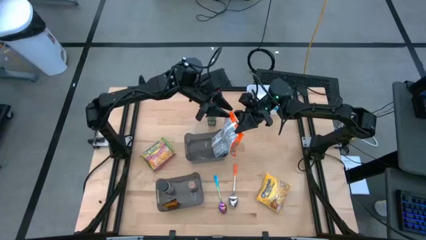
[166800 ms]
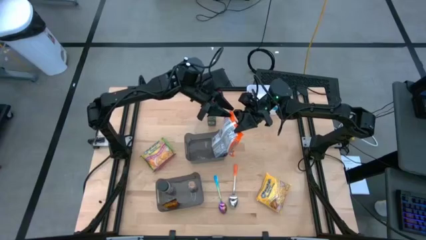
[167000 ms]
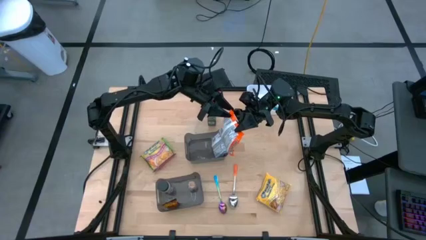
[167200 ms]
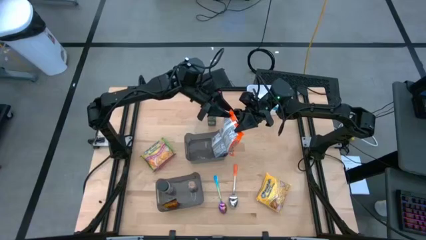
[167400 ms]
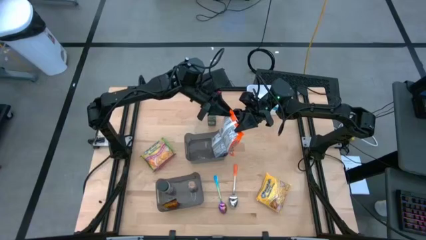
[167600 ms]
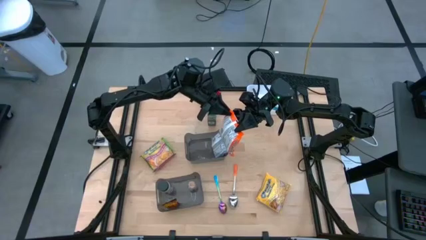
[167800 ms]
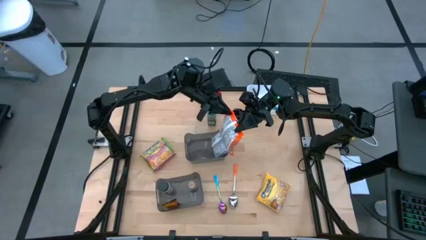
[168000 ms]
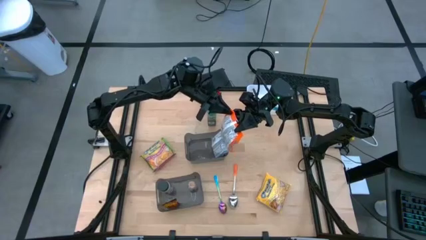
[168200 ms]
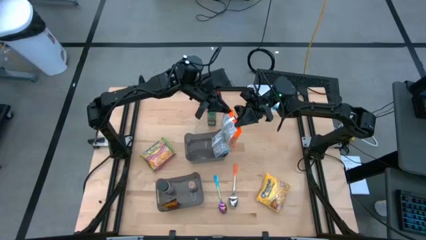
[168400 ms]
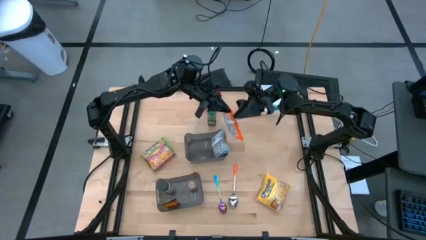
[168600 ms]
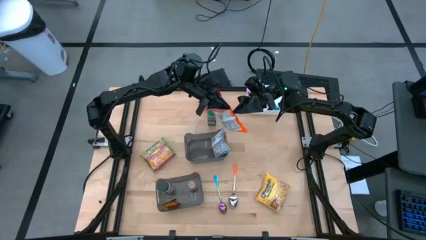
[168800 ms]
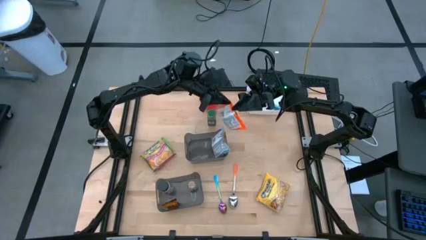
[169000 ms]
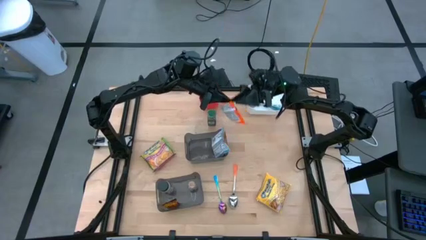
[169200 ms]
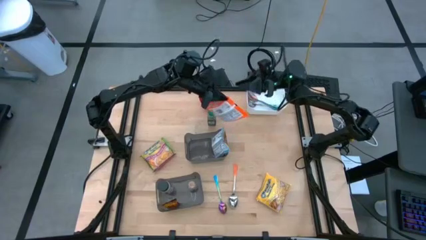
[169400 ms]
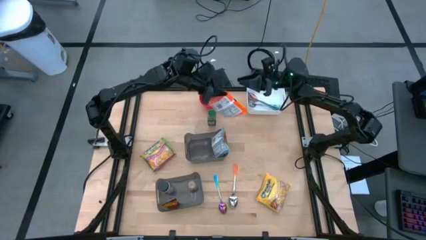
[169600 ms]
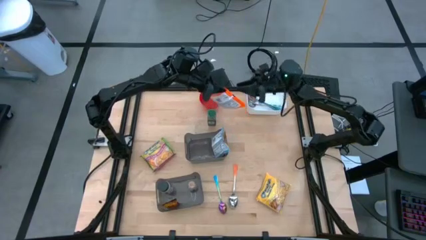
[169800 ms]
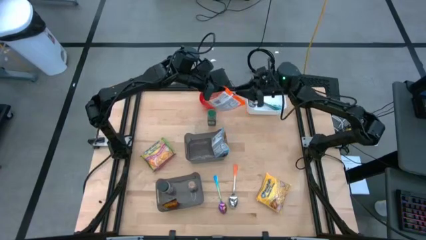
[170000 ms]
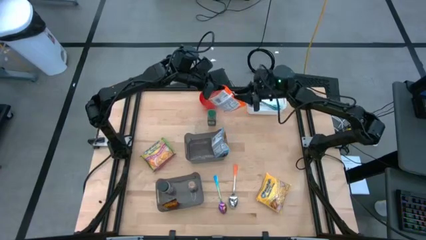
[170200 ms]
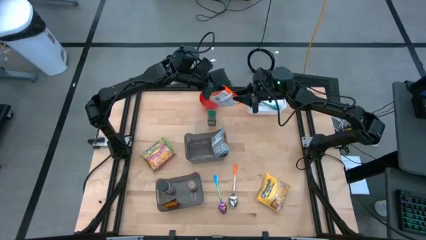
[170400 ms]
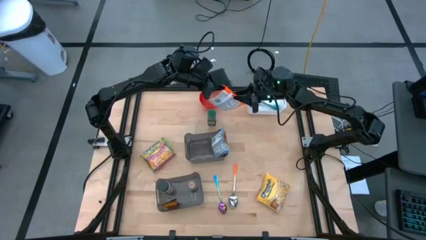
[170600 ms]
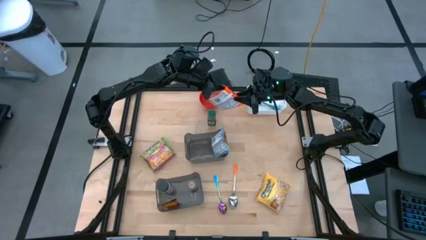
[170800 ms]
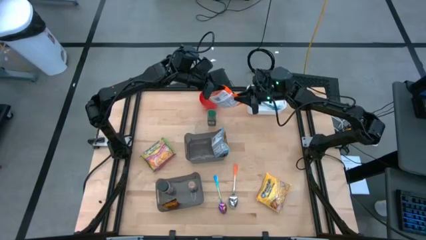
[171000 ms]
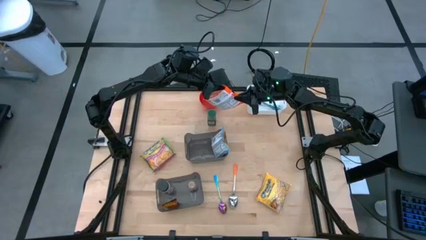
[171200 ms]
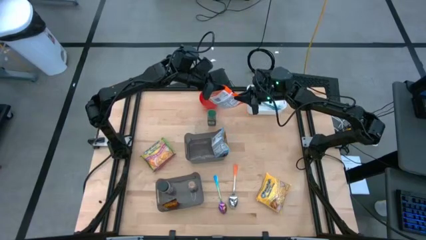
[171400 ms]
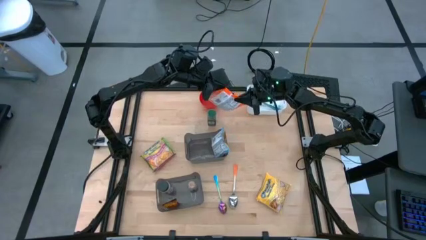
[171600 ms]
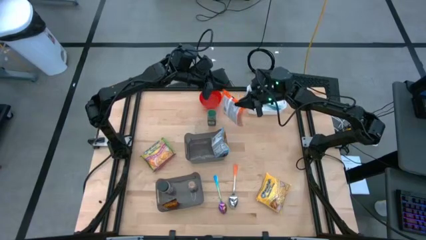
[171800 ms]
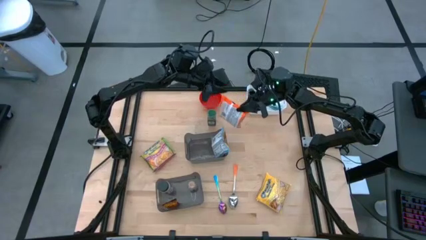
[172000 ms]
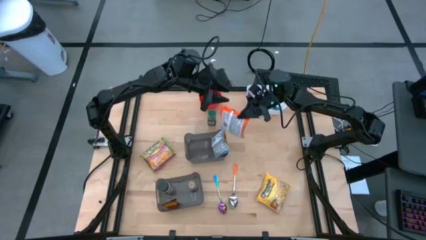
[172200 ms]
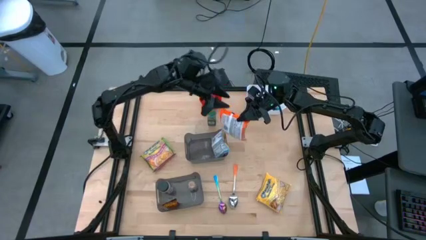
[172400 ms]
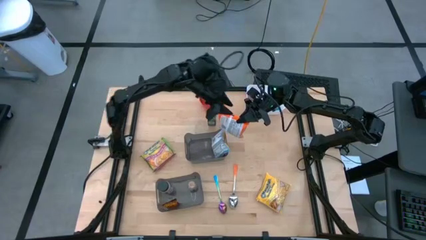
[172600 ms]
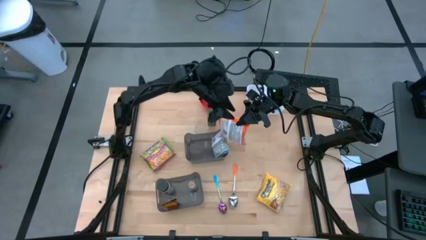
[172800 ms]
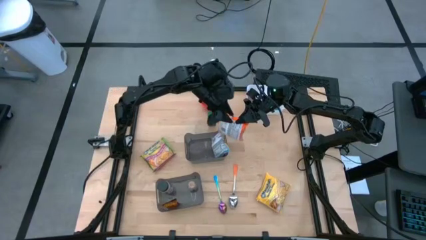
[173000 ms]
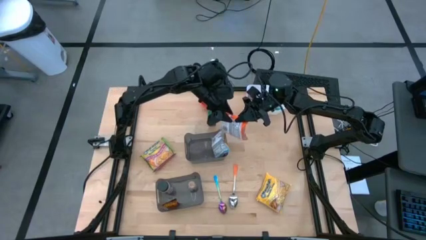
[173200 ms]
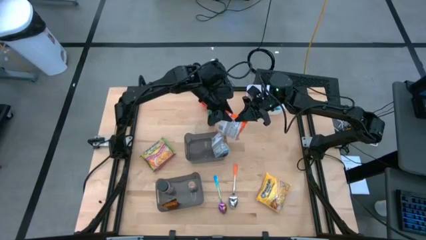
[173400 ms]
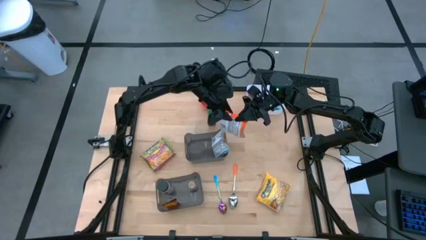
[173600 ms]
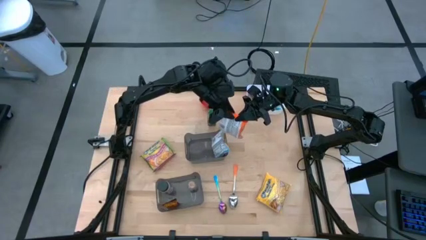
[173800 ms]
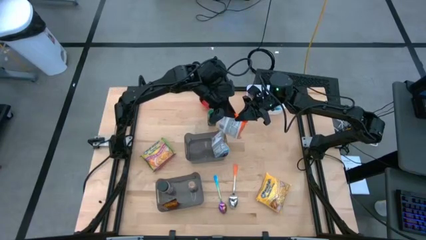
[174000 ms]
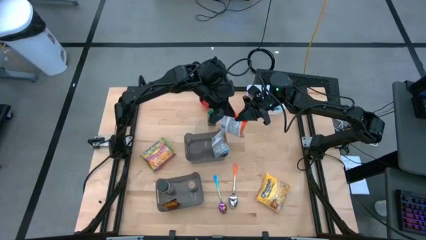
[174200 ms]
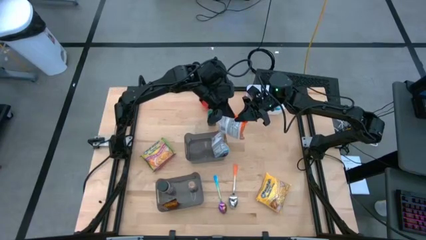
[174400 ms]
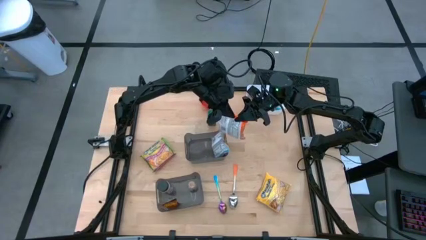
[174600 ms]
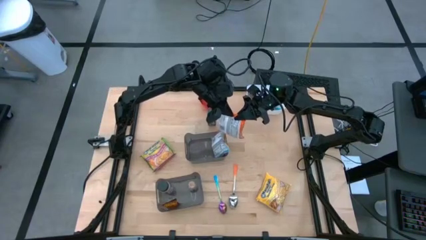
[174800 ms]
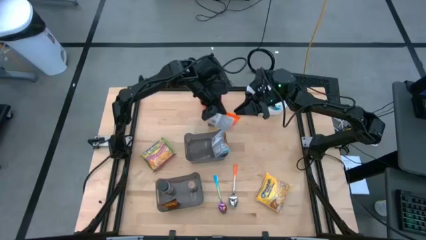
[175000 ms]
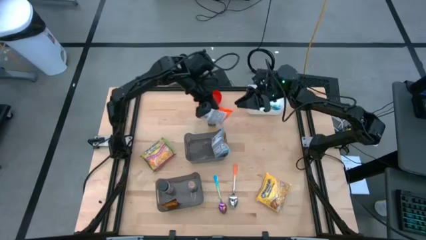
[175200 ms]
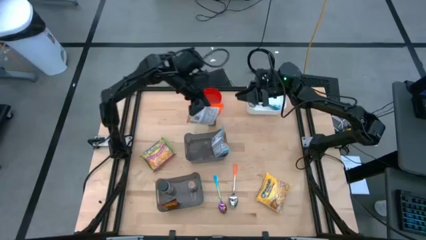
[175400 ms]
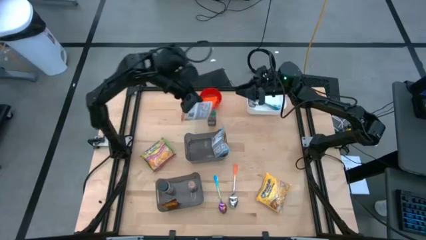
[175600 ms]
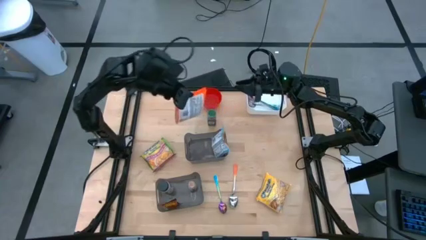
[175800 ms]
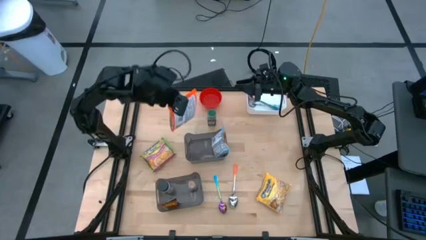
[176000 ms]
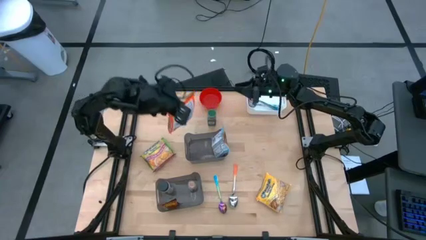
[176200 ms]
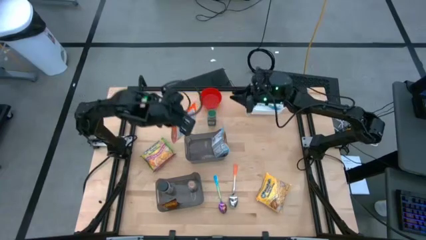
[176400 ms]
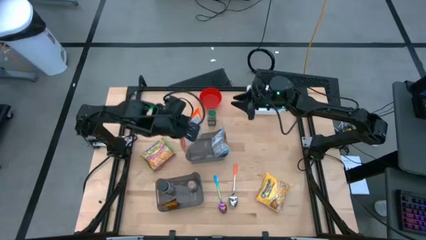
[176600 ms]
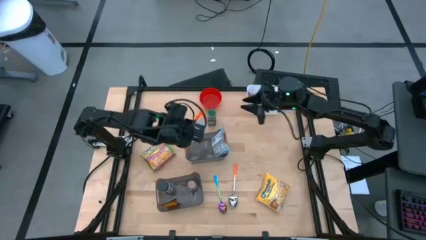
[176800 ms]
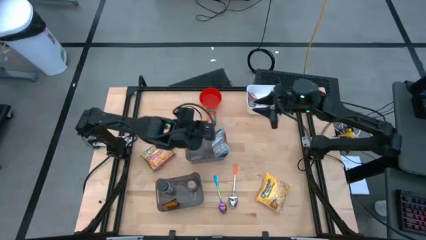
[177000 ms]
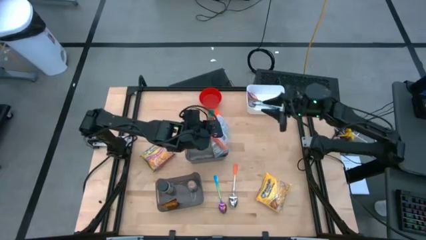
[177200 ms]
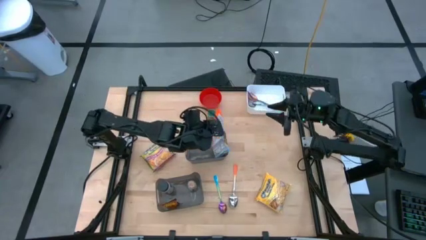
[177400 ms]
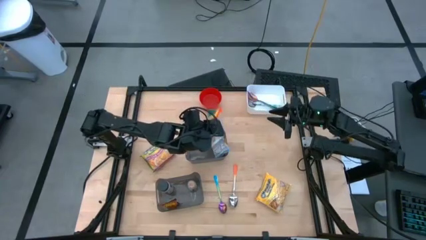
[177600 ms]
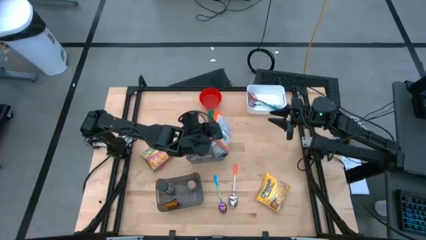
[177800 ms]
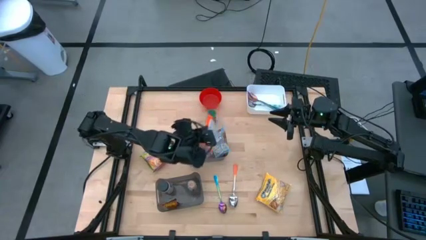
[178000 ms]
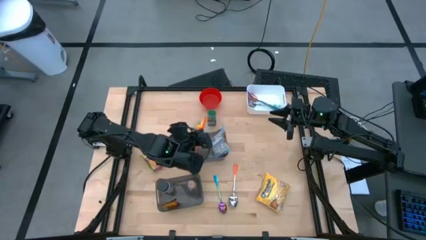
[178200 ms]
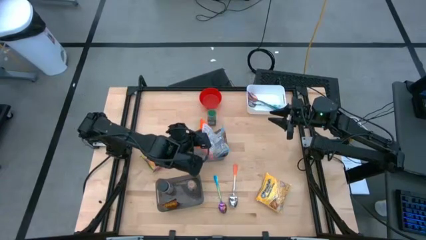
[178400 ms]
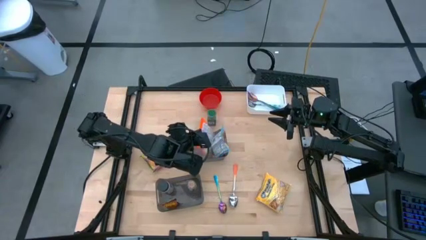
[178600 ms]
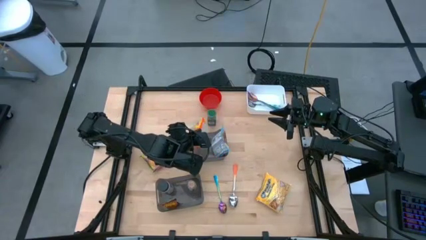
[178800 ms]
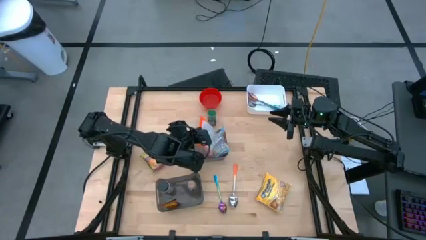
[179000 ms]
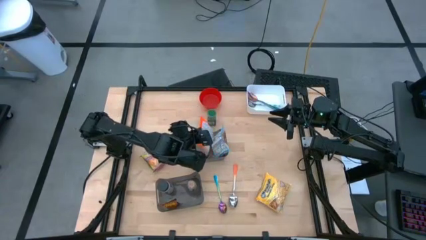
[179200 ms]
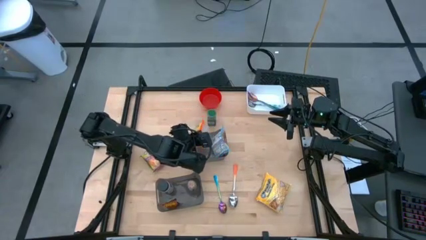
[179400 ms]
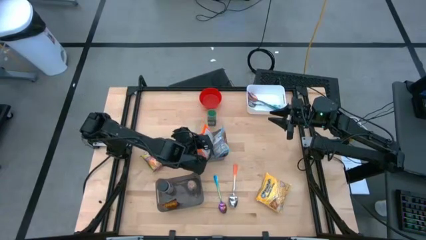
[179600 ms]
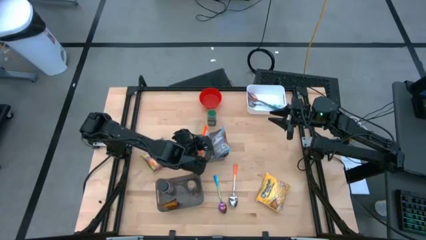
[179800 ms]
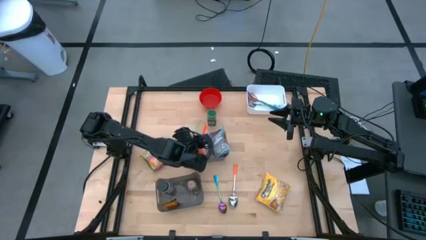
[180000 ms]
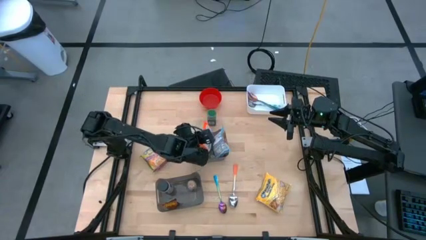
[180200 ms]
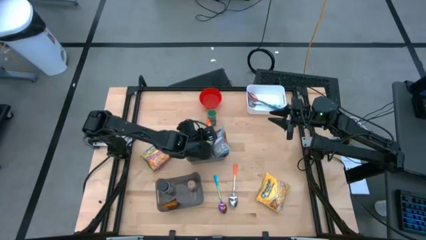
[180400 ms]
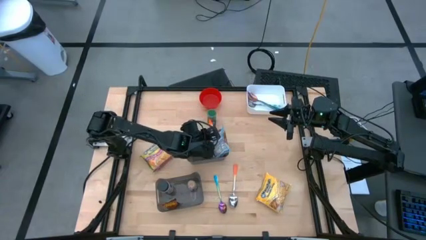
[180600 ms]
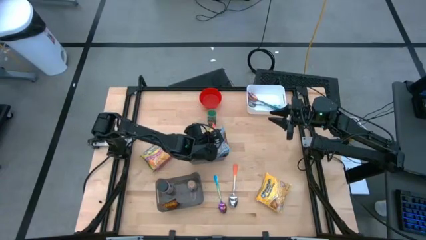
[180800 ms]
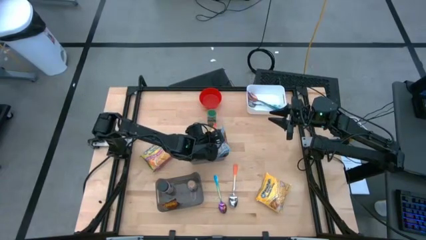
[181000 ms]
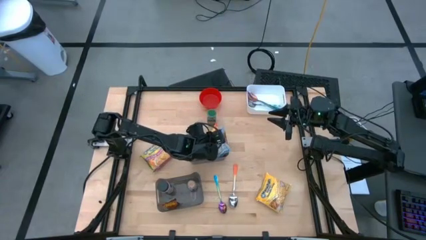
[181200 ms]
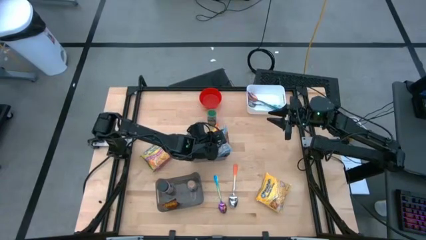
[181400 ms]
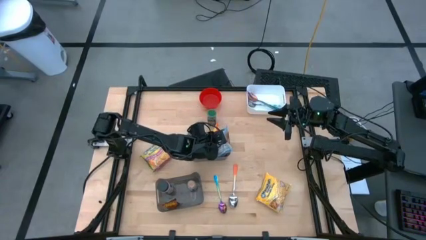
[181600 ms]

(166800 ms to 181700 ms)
Task: Pick & Place Food Item
Put the orange noodle pack into the top black bin
